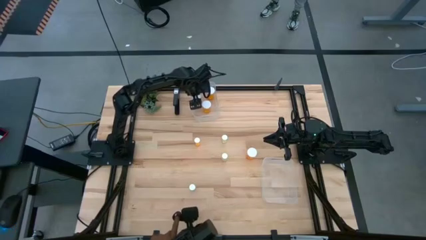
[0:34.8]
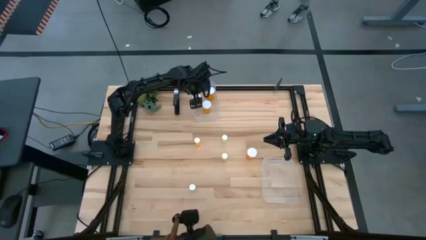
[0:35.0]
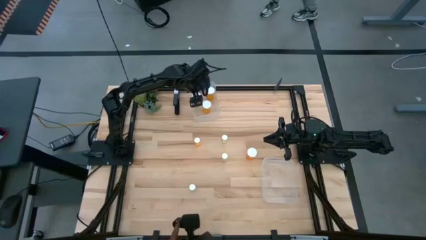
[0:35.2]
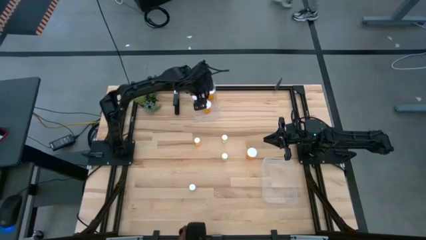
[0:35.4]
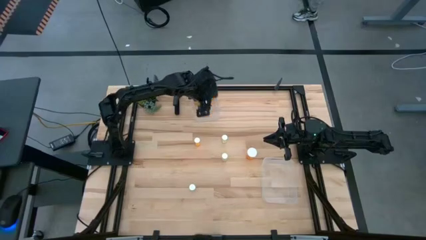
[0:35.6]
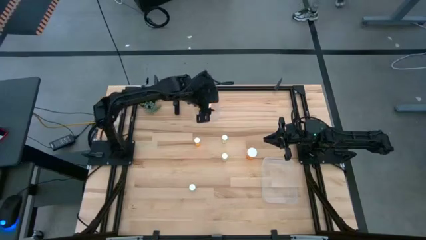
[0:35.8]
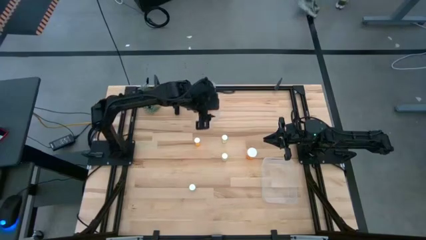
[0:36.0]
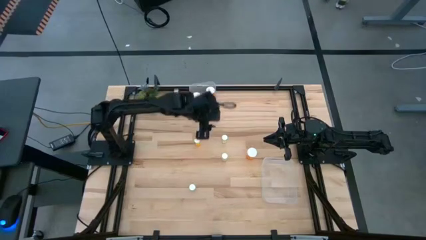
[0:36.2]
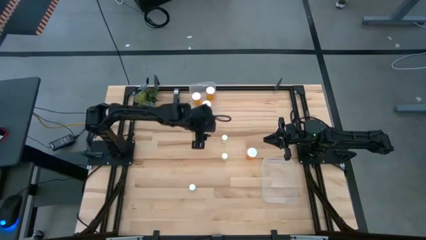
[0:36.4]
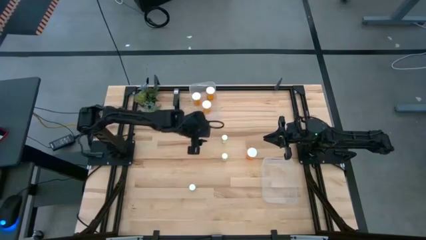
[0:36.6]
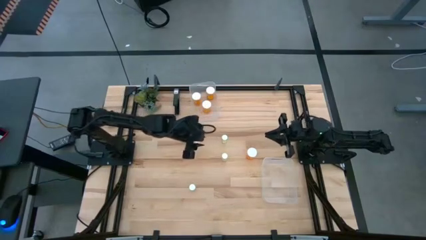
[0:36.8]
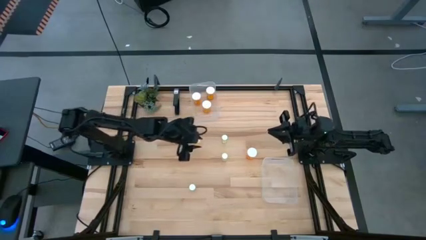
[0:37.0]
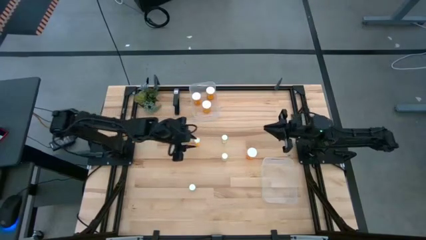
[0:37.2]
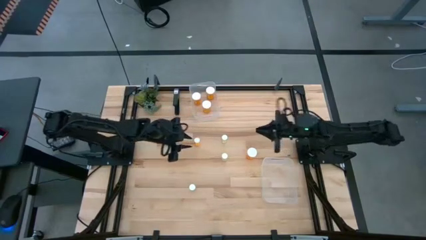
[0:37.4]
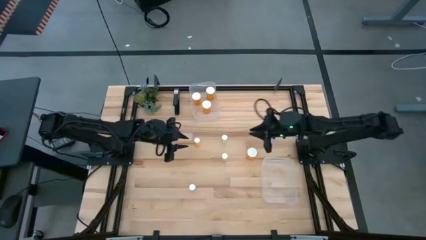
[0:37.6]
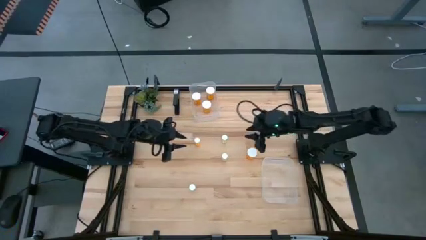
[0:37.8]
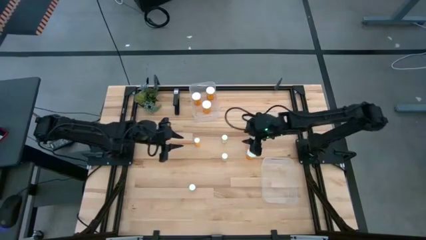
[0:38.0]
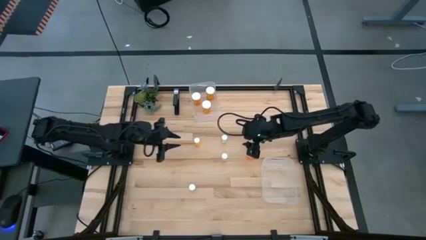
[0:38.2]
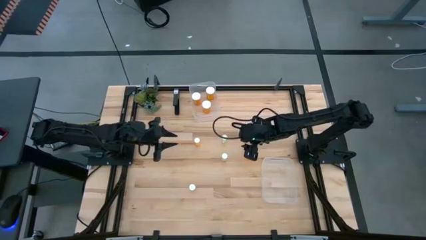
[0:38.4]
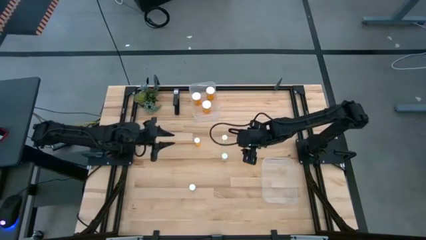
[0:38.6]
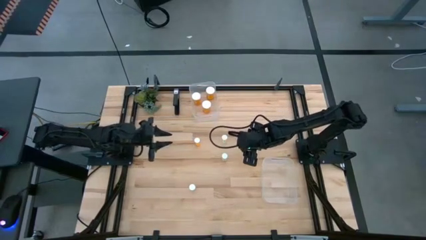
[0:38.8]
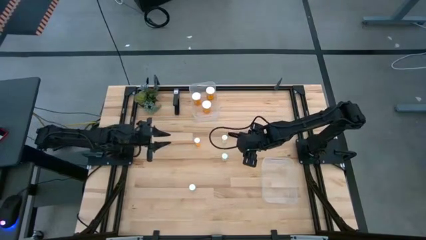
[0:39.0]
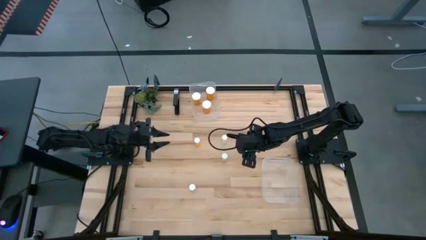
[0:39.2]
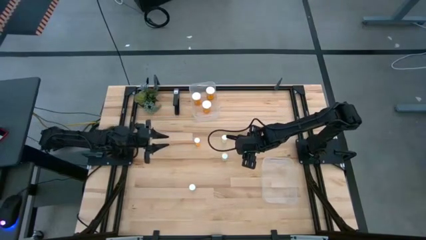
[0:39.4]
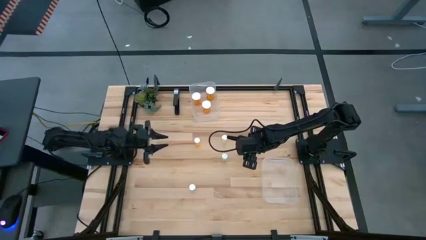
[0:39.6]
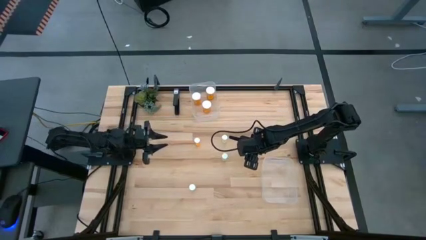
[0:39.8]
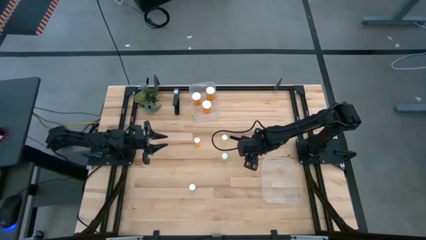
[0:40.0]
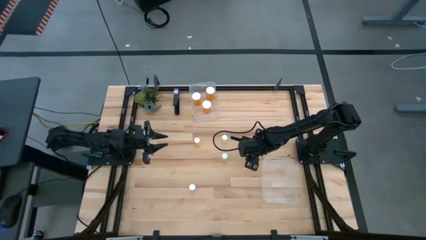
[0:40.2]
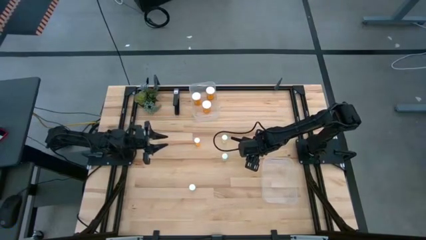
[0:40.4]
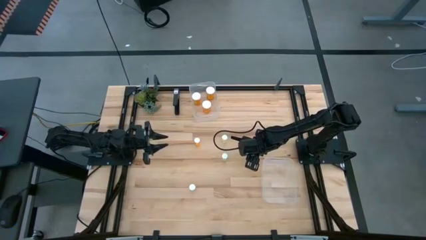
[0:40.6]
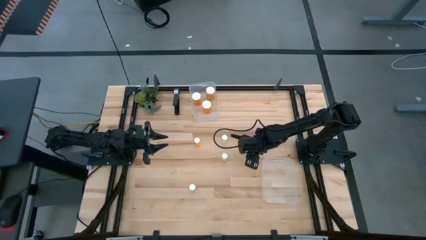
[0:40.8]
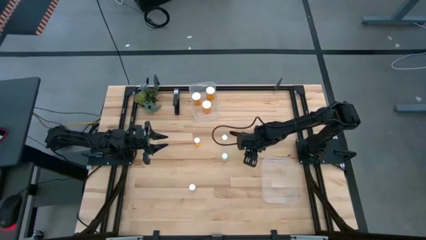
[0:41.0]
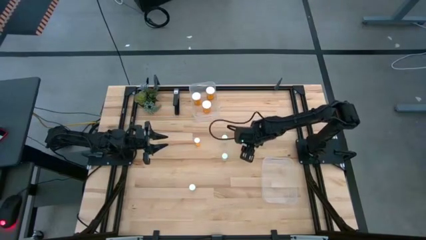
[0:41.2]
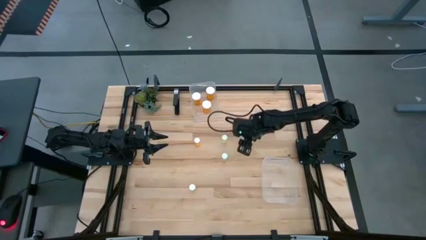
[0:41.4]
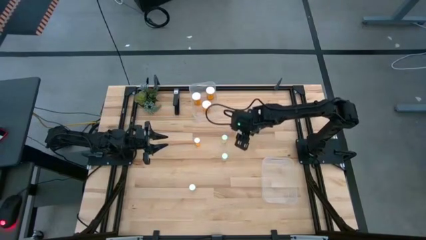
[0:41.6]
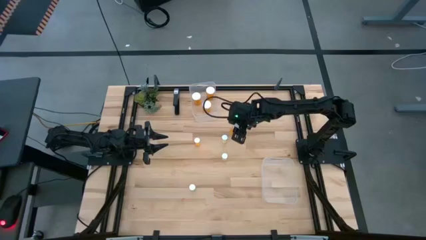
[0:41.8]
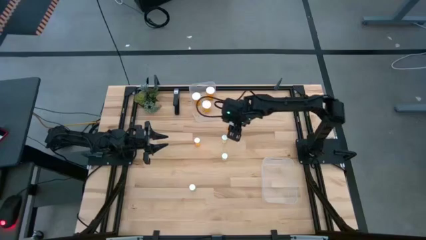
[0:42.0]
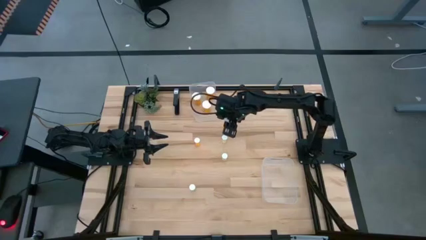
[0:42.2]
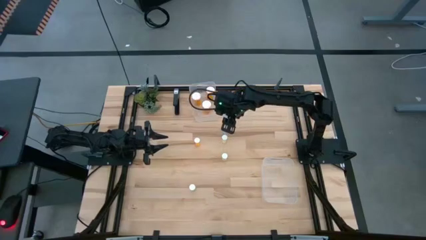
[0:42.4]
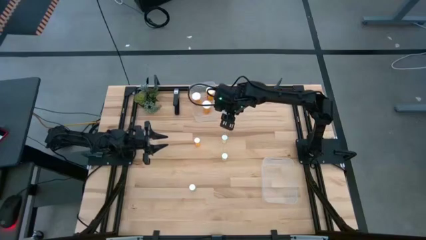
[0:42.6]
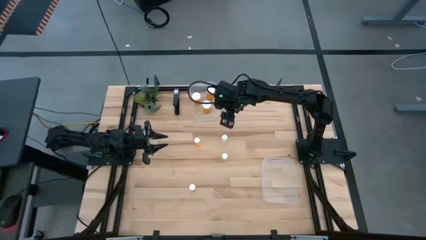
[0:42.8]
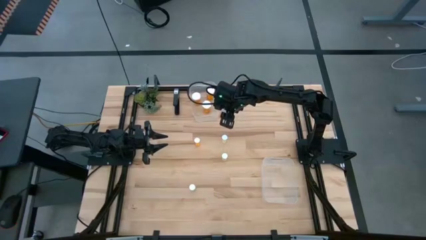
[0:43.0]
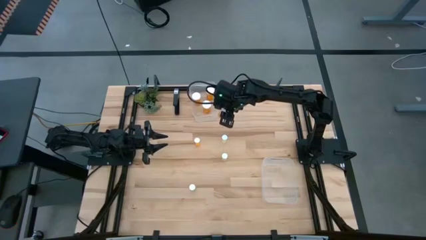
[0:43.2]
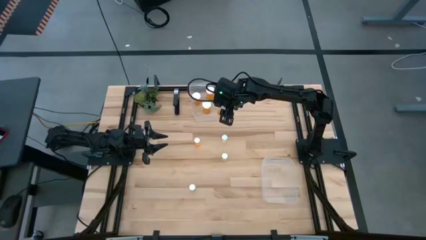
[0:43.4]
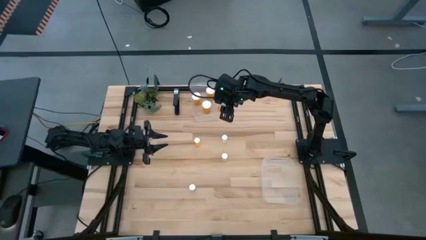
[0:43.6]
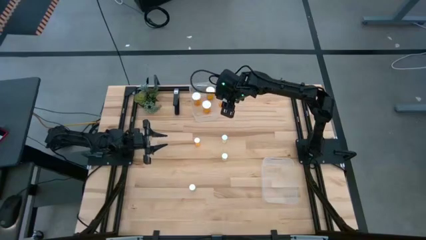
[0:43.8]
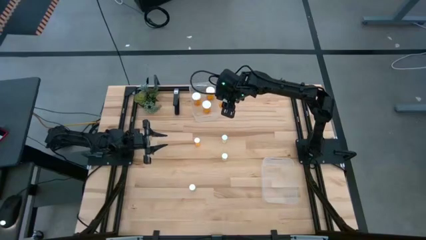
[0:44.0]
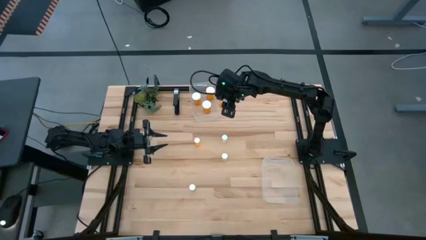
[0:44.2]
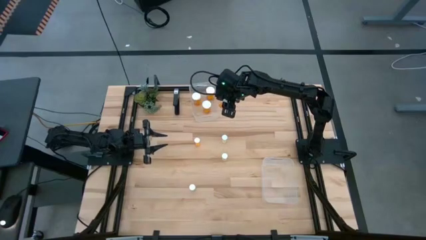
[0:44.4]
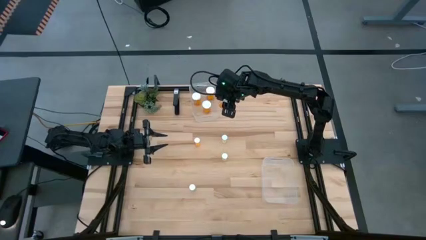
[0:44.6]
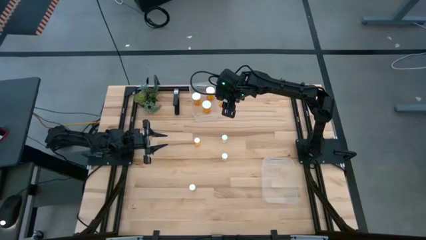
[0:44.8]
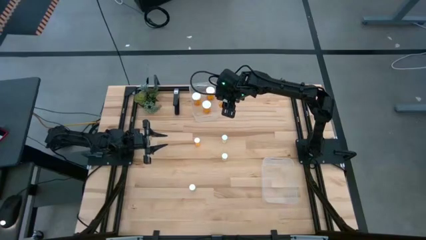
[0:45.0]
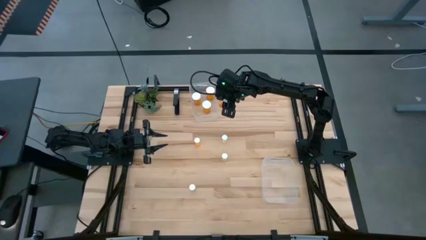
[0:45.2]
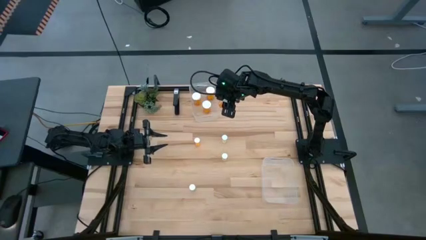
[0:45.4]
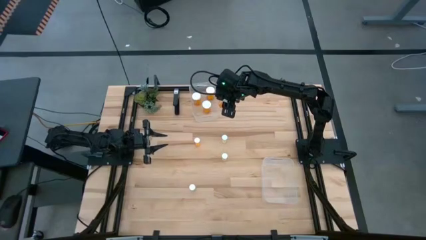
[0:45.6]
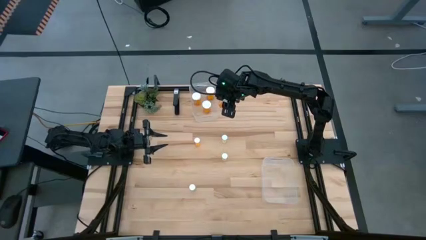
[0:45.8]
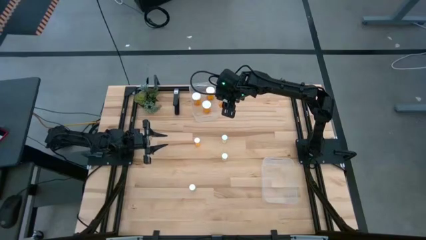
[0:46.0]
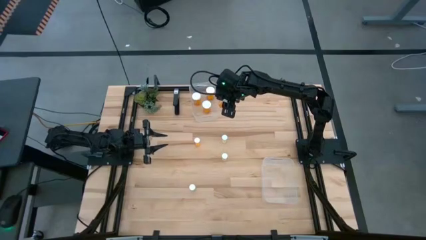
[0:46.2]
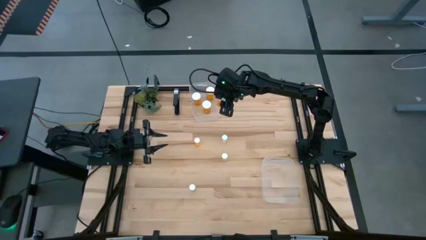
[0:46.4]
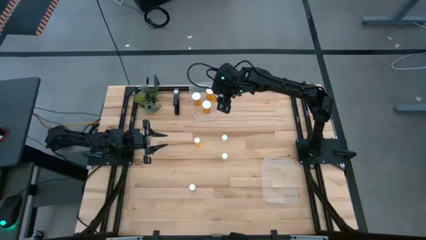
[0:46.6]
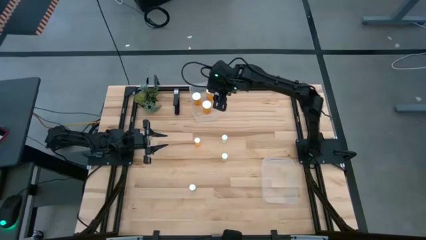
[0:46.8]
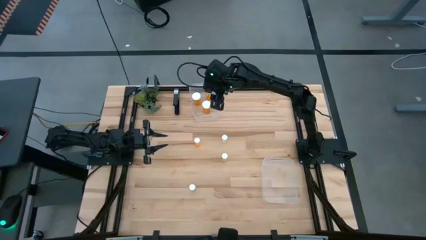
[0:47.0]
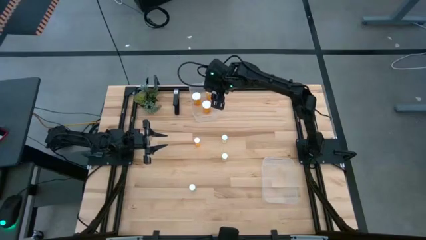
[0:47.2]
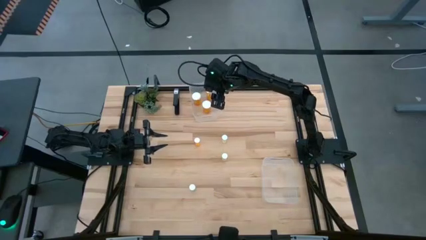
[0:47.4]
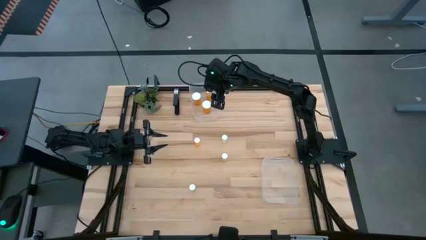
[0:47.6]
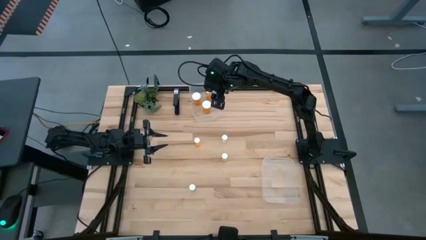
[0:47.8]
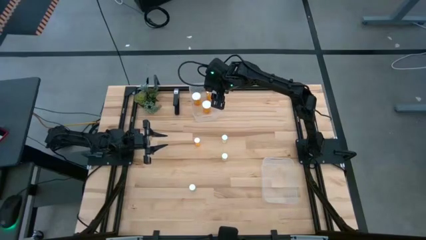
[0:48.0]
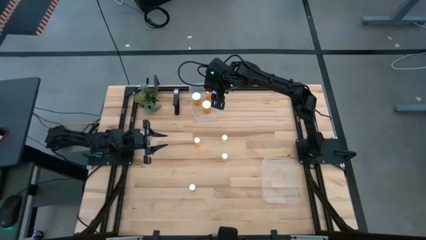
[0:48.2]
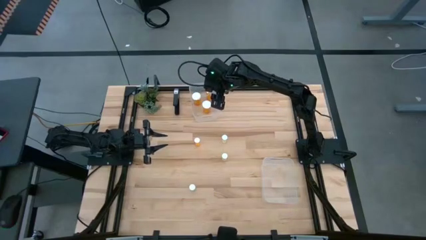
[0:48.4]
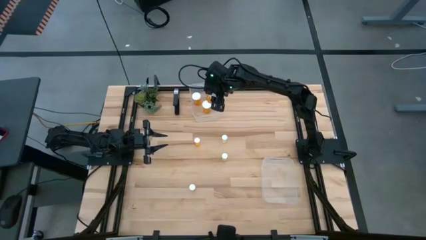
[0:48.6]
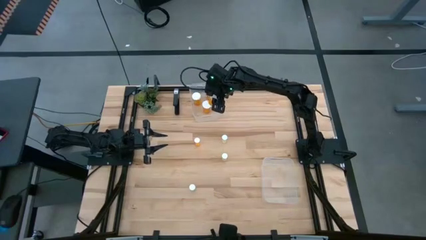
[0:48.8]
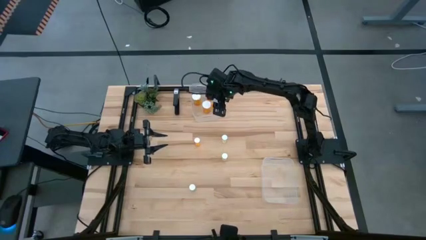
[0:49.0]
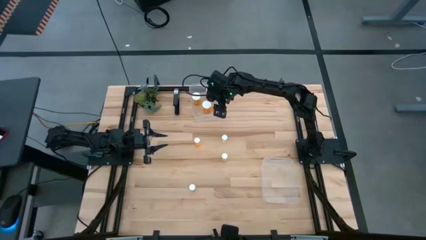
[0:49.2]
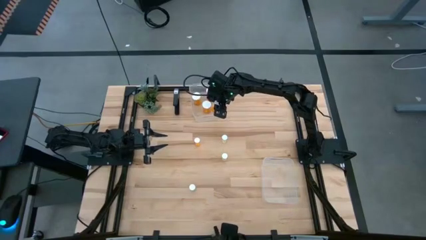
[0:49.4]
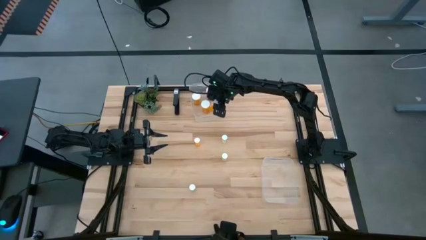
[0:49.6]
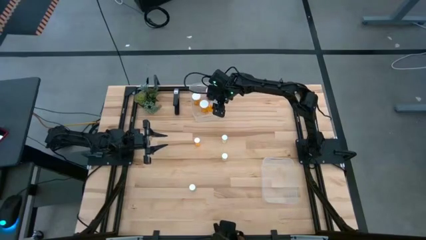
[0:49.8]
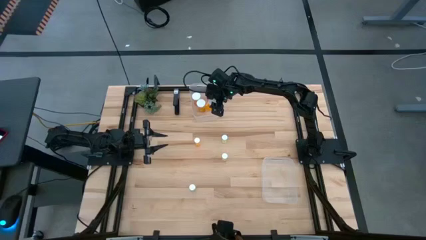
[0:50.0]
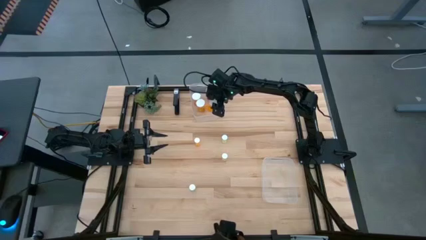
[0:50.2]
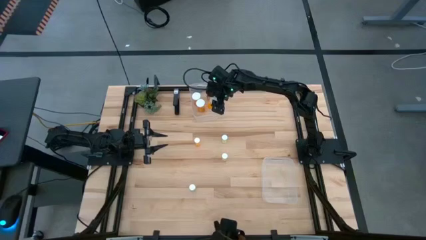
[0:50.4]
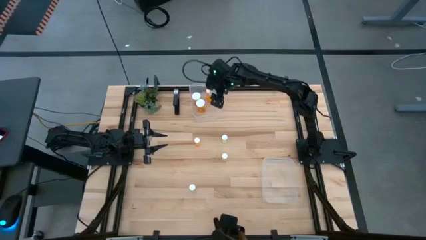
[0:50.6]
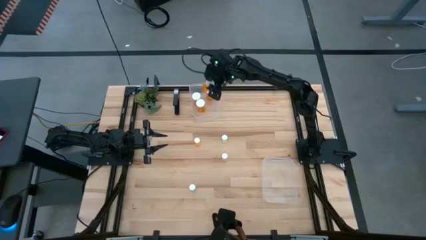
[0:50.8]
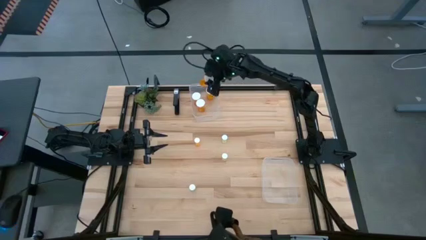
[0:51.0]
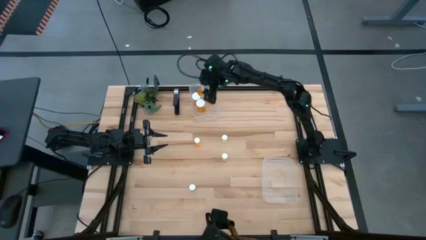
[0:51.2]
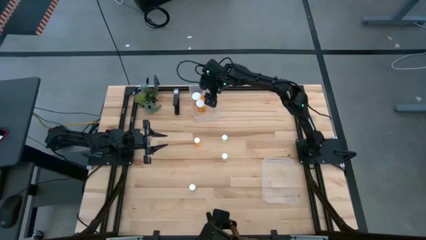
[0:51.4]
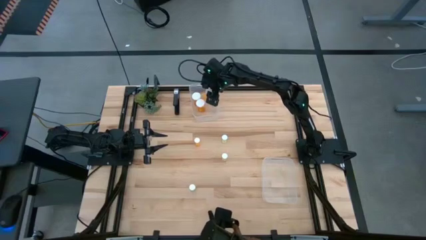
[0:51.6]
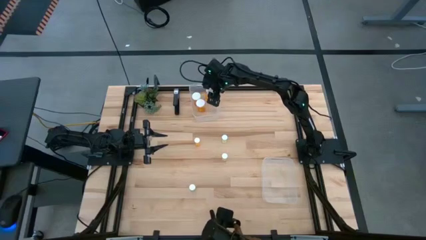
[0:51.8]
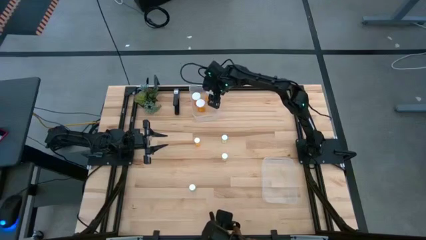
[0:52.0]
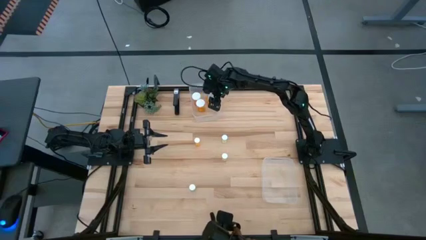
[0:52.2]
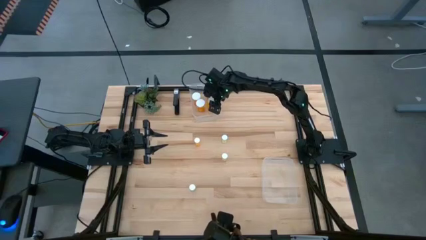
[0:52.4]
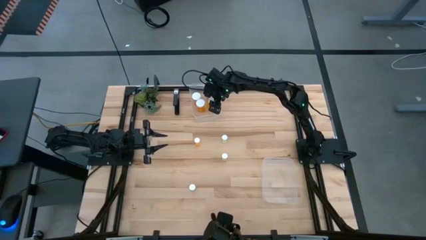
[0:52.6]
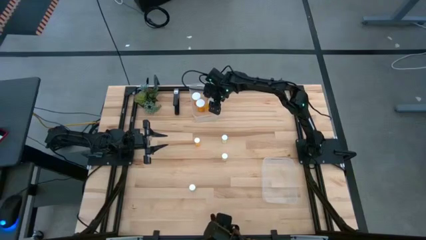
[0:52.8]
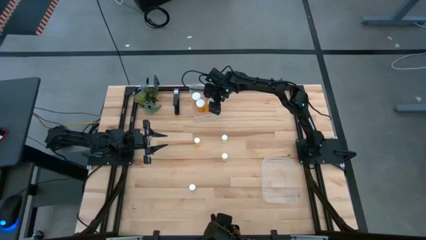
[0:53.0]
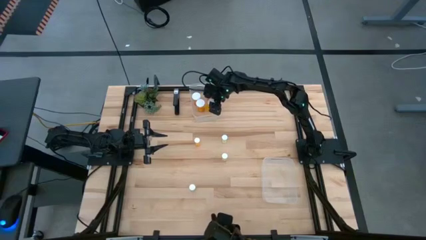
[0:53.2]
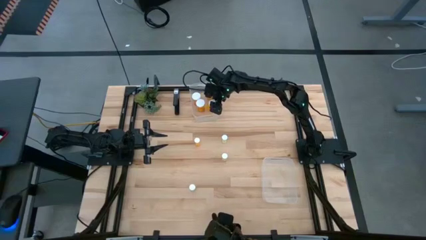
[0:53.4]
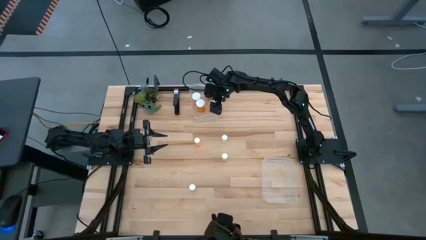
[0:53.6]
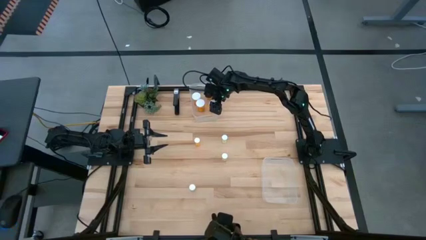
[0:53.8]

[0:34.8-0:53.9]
Task: Pick and place medicine bottles into bin by pill shape (circle, oval)
Put the orange capsule bottle into the top transparent bin
